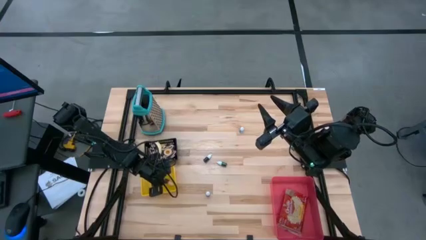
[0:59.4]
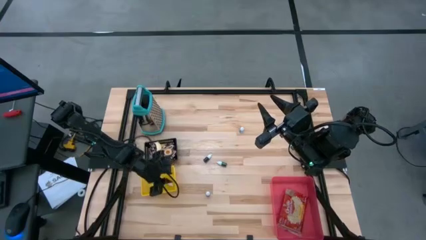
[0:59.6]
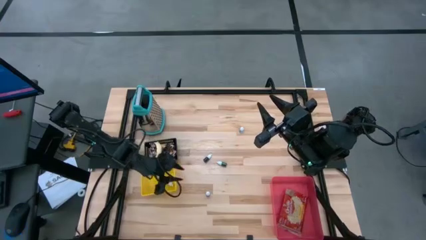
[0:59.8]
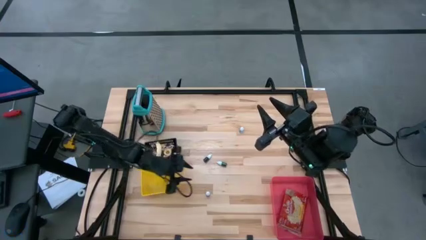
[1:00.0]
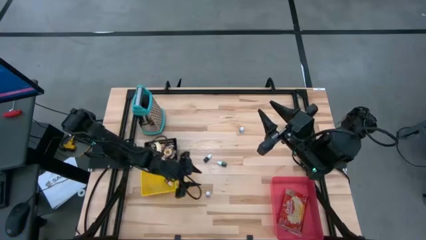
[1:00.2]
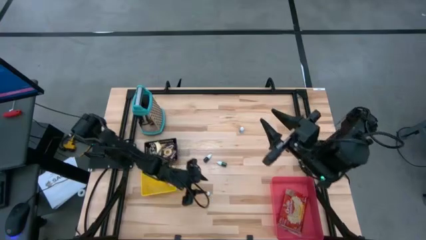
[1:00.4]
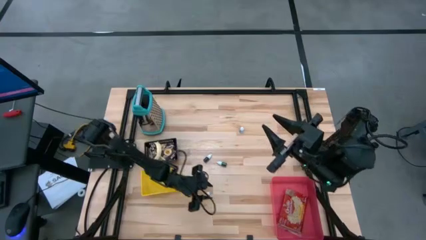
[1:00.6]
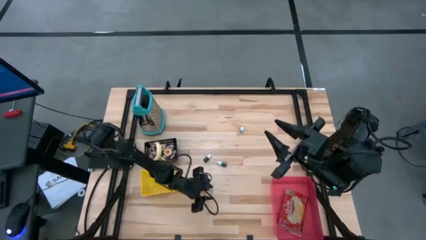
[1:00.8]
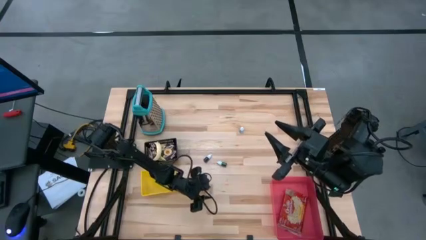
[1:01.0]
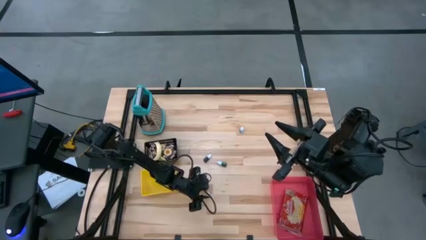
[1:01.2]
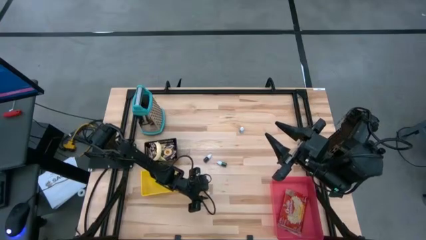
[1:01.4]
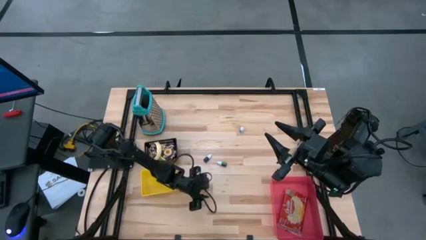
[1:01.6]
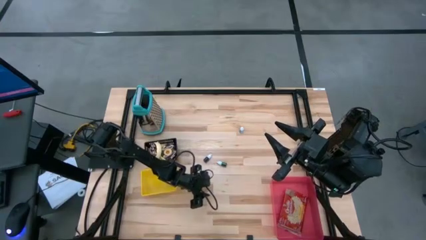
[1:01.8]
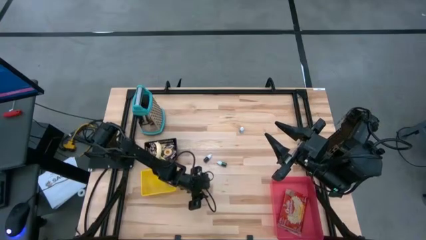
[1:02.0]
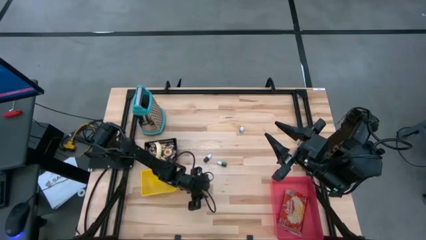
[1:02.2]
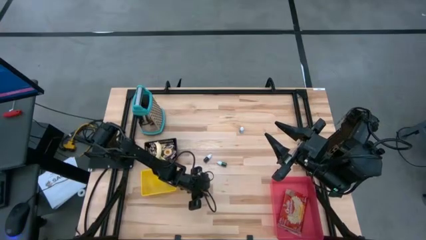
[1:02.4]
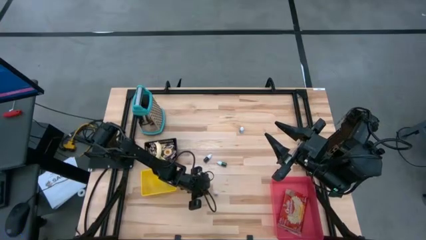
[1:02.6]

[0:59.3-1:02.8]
Put the red food coloring bottle into the yellow bin

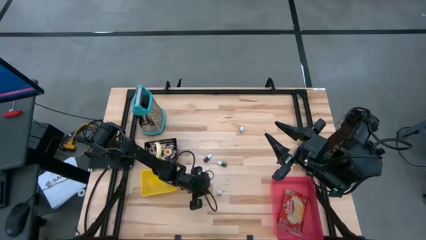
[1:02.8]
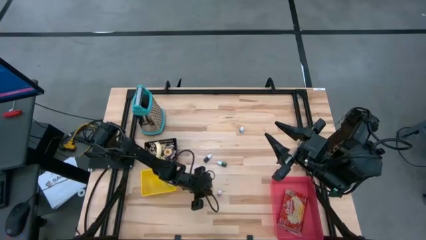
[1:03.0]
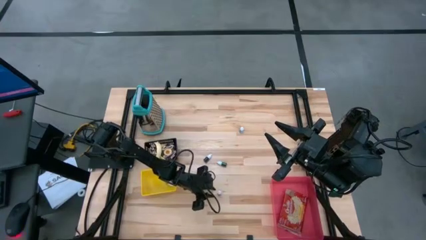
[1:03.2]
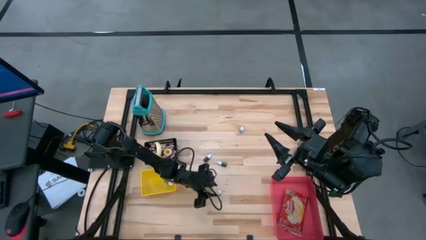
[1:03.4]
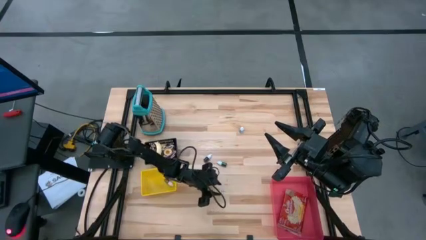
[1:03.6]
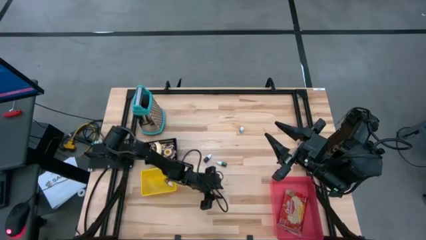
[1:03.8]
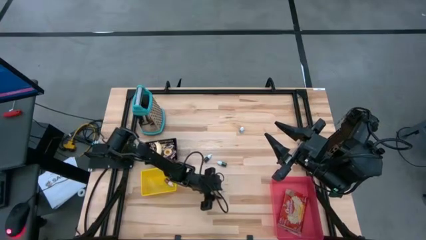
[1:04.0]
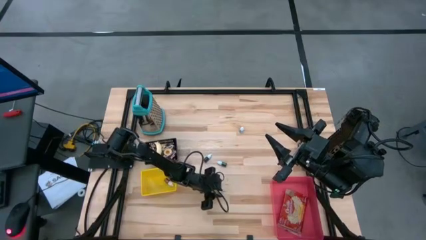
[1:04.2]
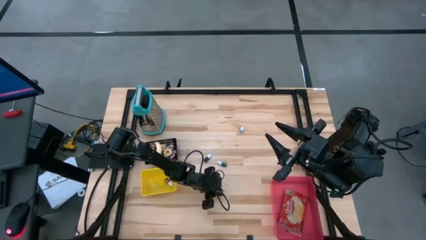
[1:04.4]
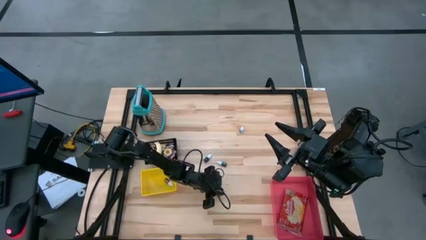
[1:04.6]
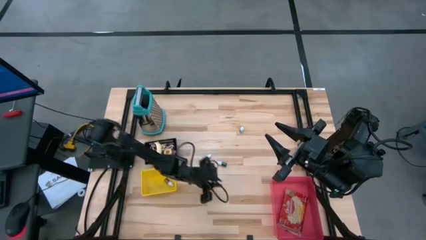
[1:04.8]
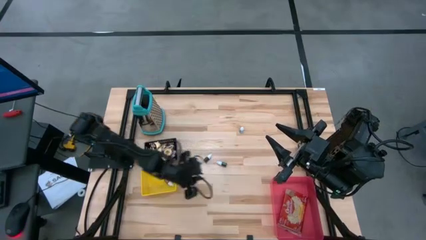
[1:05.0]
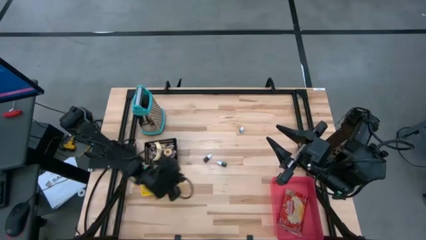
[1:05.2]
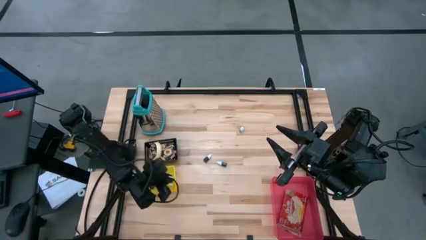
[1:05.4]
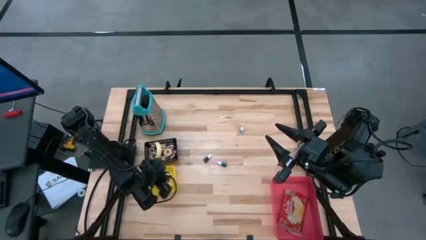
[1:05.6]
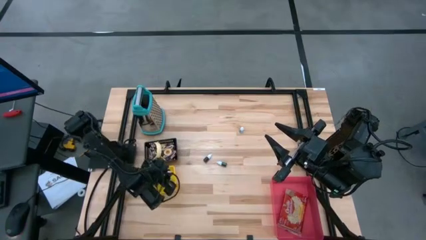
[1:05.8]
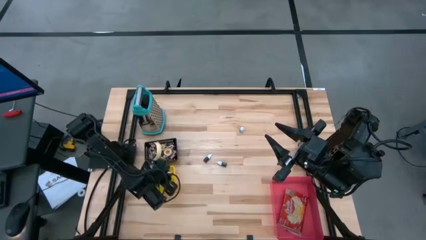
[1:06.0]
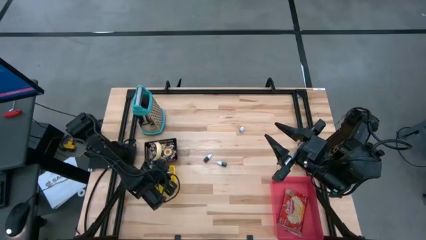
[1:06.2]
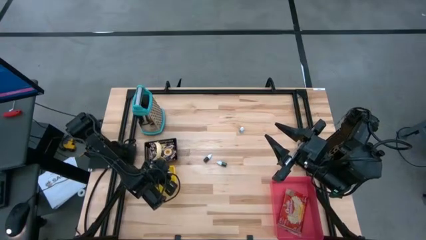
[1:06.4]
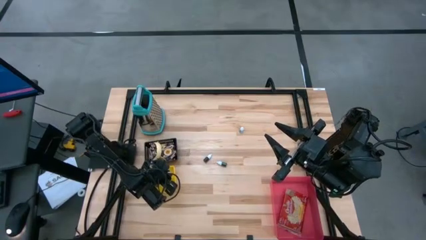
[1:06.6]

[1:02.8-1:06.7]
Put the red food coloring bottle into the yellow bin

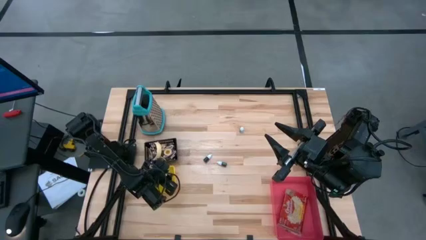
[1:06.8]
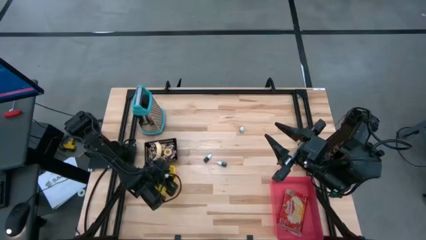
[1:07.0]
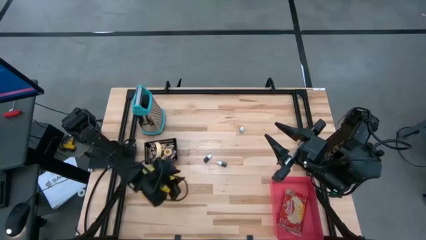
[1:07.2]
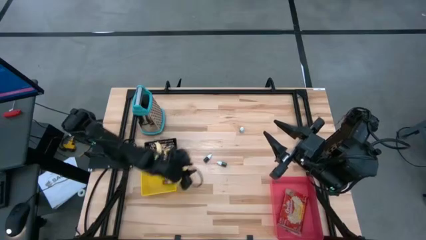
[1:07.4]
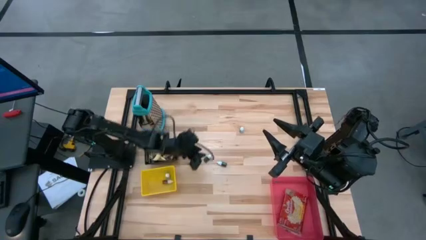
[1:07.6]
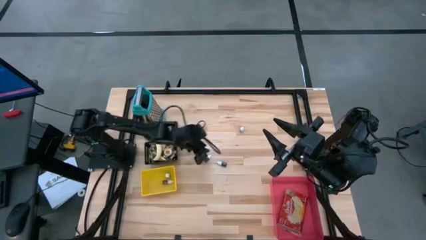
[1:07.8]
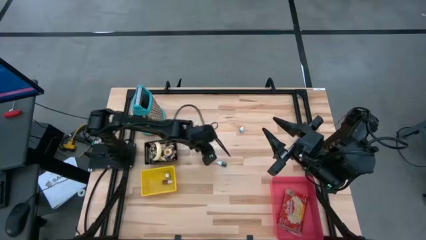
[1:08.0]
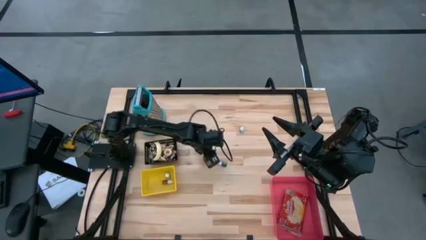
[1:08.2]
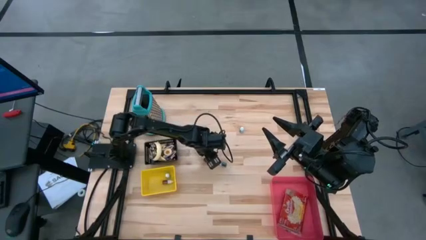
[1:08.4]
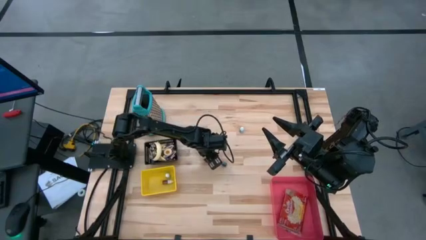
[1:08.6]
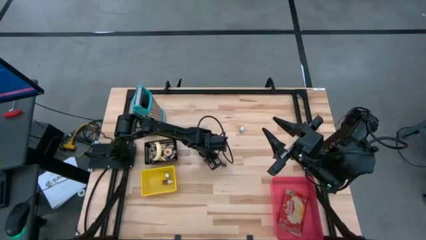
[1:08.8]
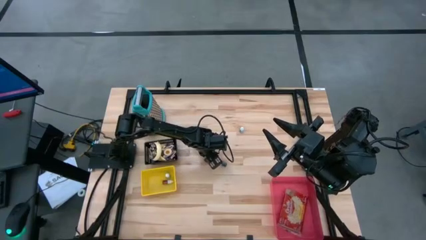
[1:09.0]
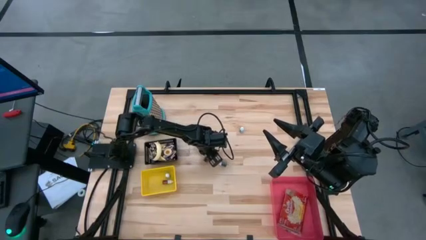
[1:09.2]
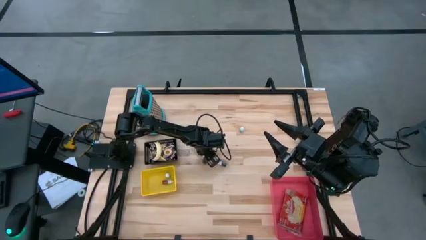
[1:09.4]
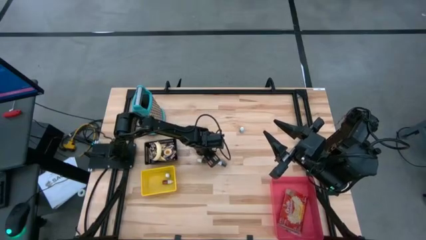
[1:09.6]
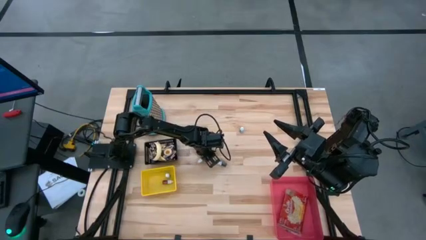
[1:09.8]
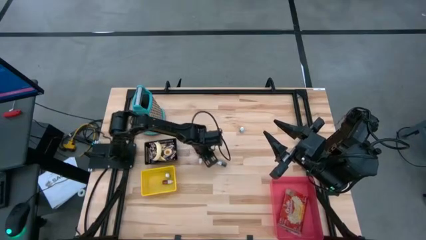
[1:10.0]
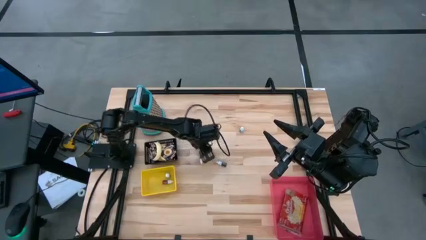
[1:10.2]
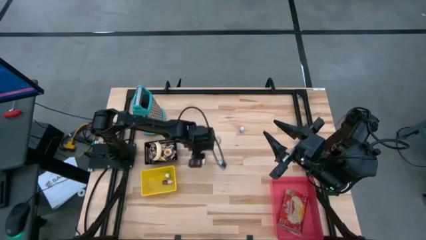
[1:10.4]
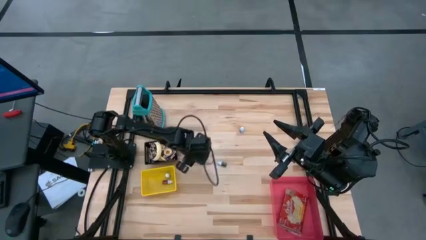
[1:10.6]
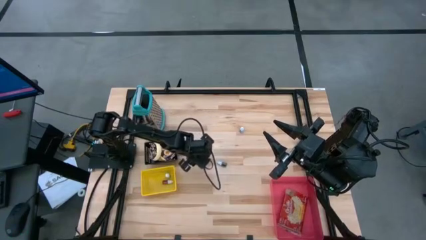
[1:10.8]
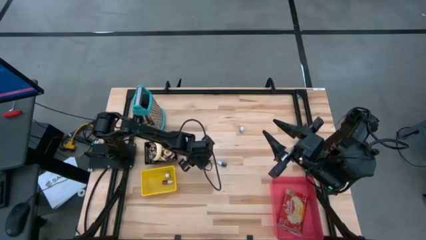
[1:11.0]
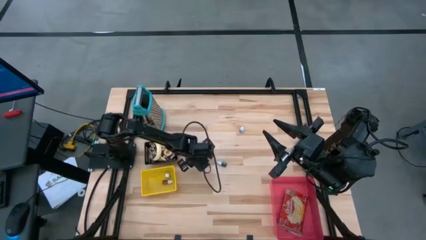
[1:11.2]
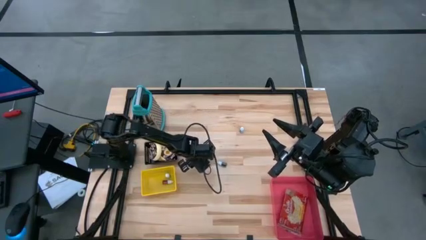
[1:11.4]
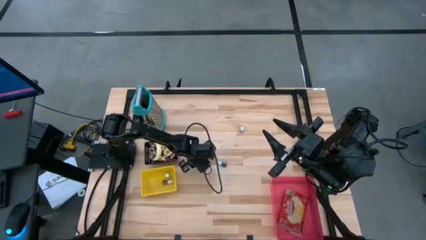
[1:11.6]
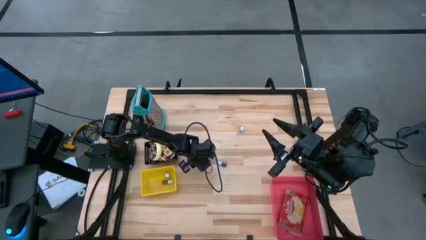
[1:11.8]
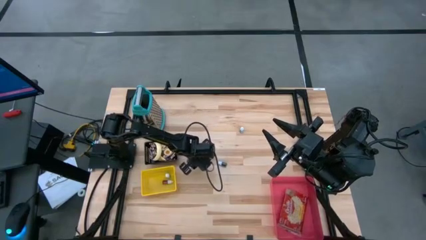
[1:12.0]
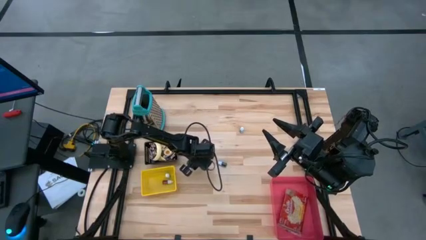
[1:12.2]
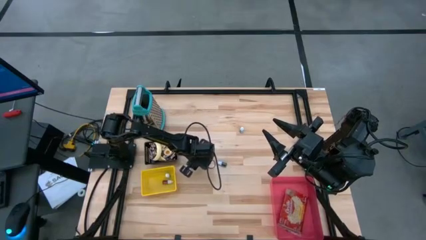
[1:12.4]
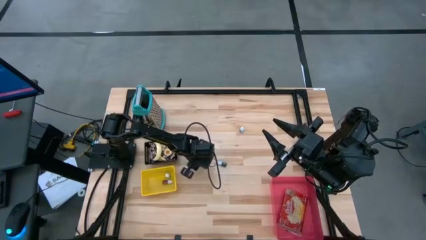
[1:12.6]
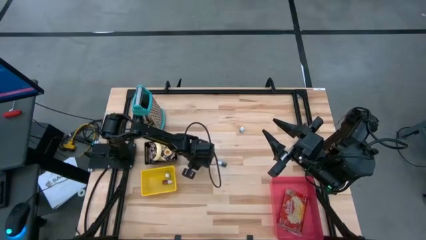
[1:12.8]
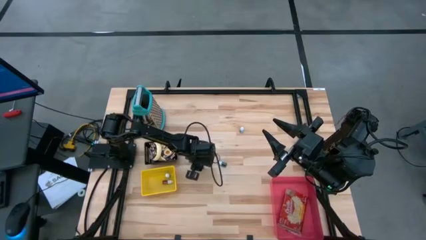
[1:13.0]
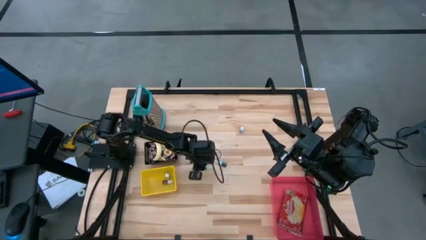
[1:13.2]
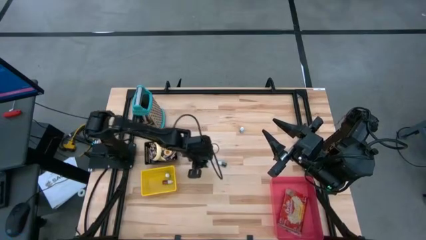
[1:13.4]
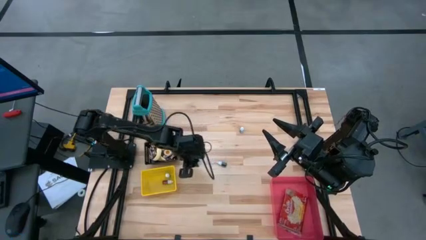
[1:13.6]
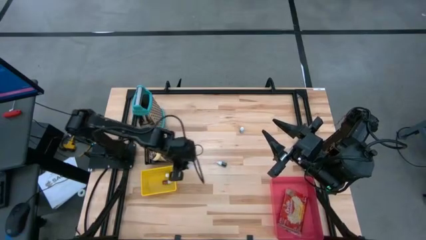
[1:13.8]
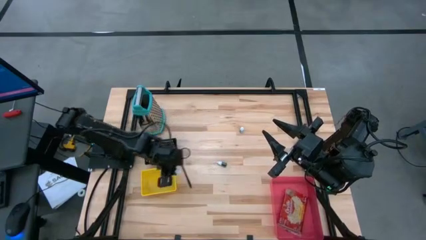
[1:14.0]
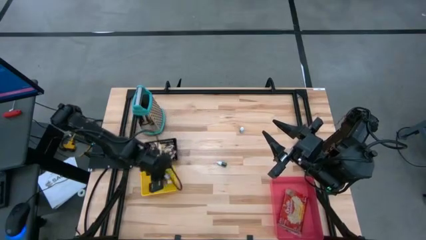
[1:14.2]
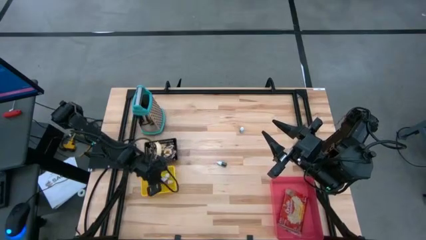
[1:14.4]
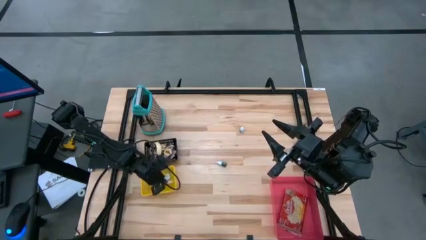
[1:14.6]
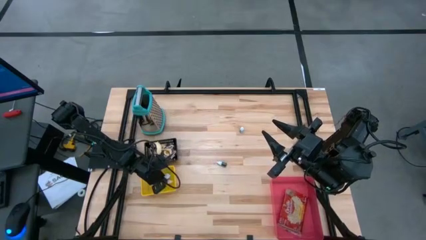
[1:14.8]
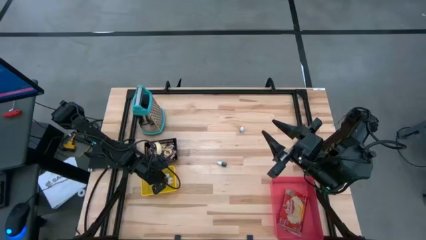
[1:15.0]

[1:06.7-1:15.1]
Put the purple food coloring bottle into the yellow bin
